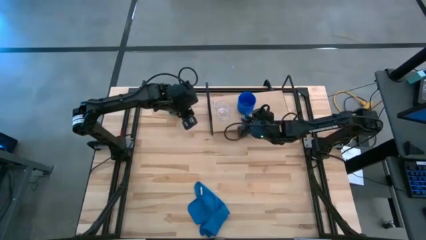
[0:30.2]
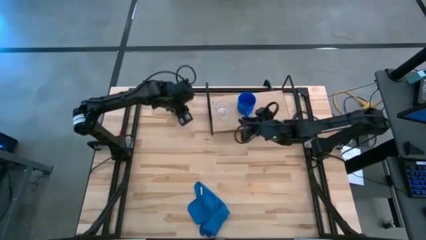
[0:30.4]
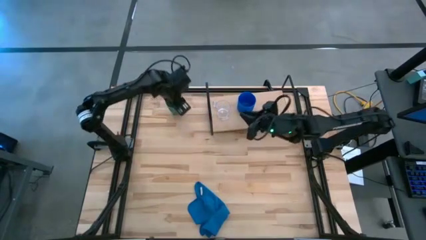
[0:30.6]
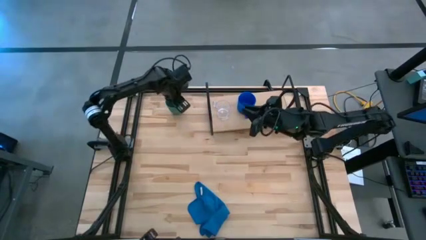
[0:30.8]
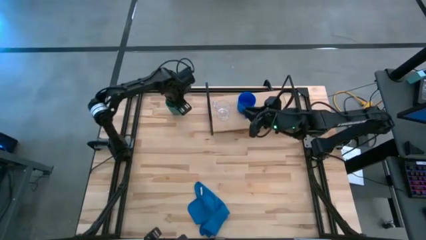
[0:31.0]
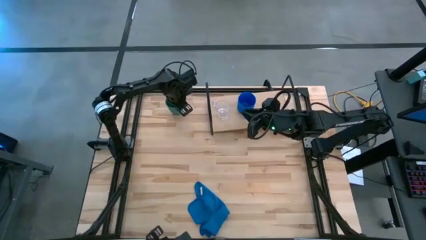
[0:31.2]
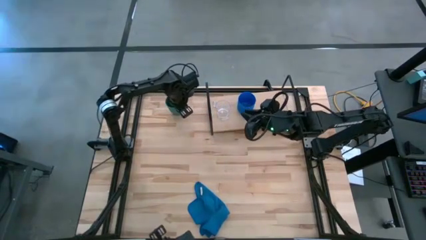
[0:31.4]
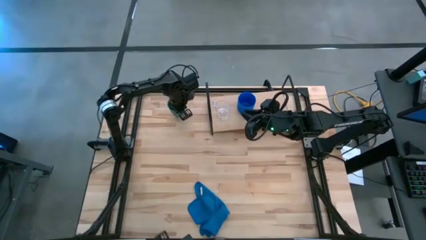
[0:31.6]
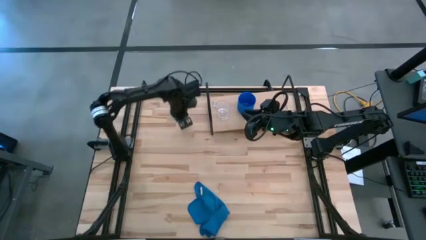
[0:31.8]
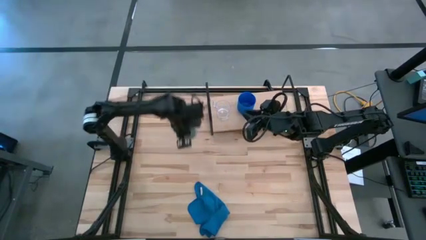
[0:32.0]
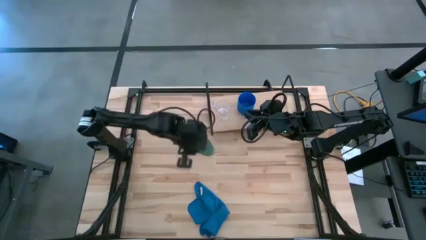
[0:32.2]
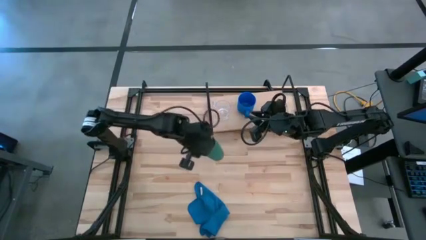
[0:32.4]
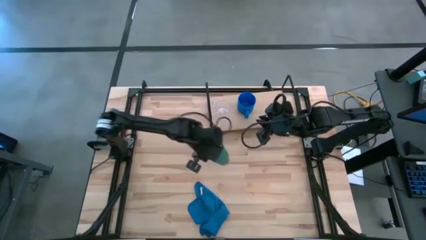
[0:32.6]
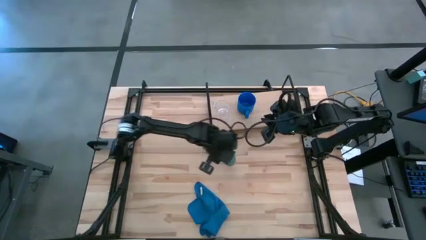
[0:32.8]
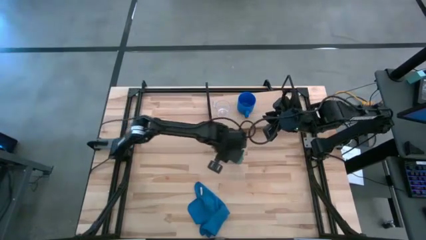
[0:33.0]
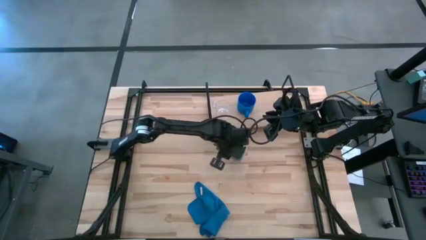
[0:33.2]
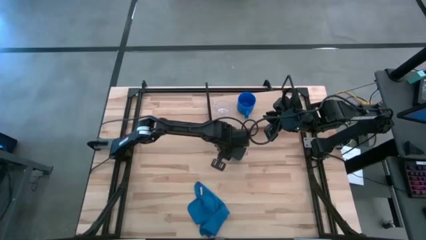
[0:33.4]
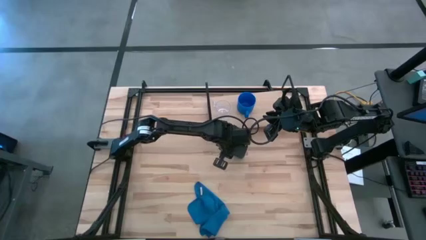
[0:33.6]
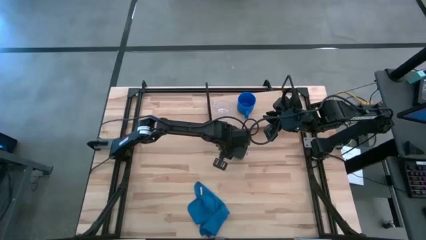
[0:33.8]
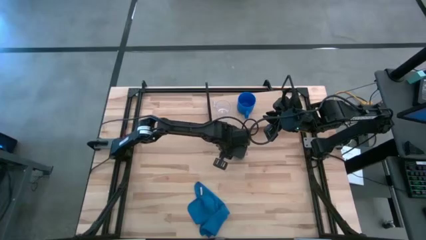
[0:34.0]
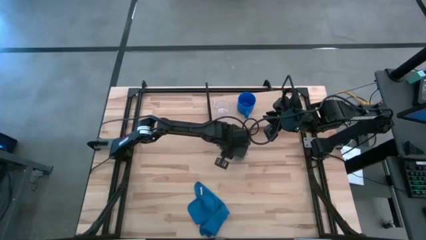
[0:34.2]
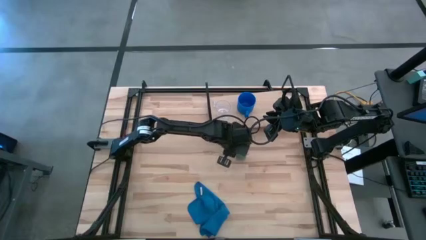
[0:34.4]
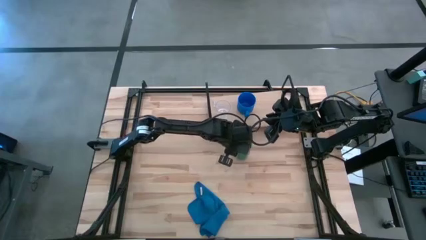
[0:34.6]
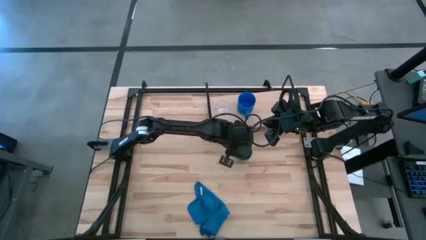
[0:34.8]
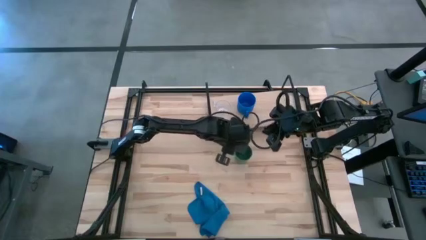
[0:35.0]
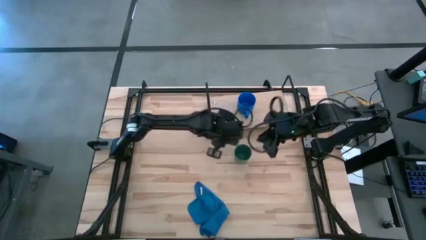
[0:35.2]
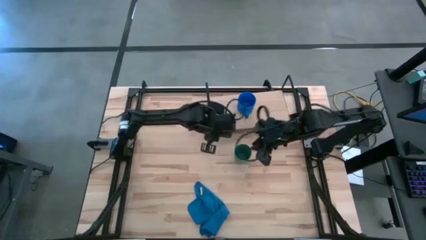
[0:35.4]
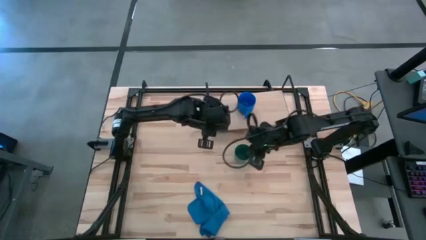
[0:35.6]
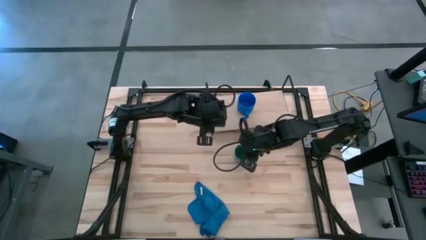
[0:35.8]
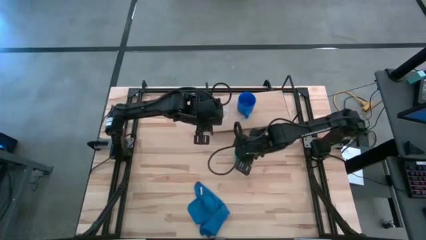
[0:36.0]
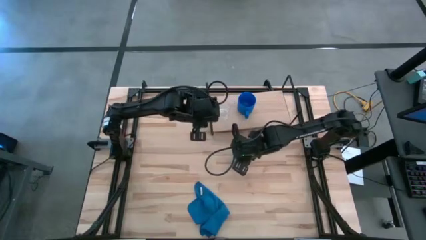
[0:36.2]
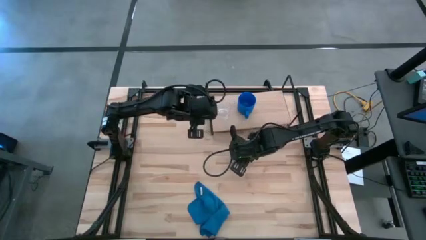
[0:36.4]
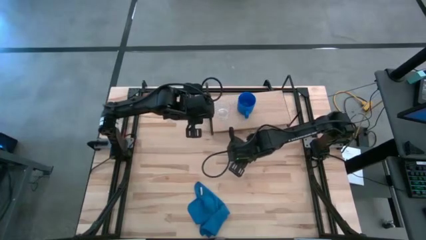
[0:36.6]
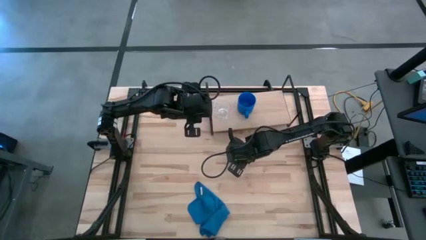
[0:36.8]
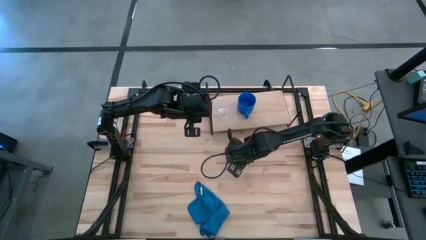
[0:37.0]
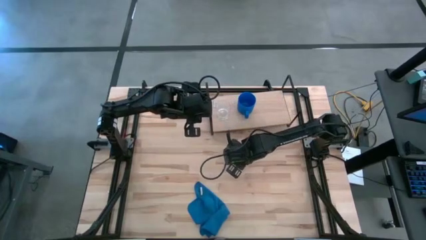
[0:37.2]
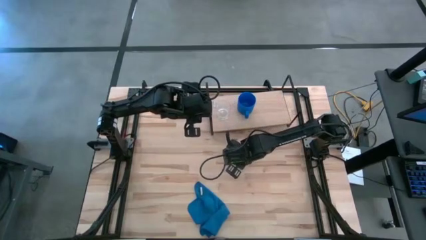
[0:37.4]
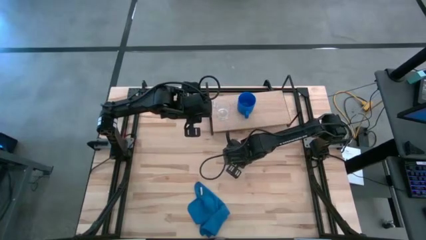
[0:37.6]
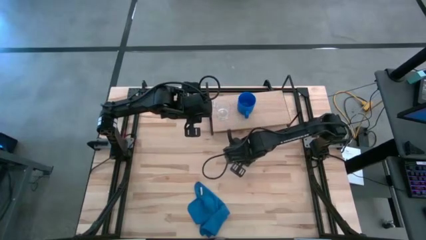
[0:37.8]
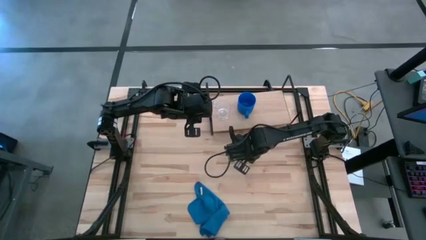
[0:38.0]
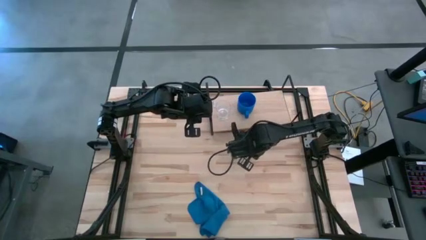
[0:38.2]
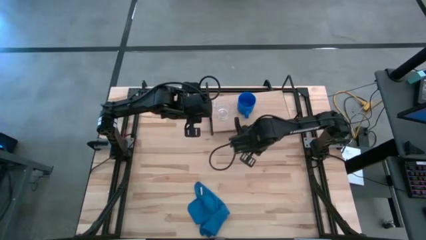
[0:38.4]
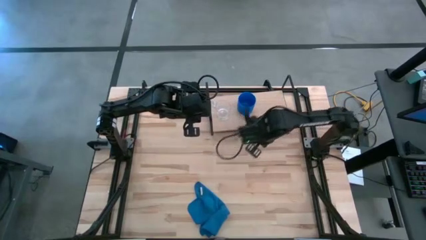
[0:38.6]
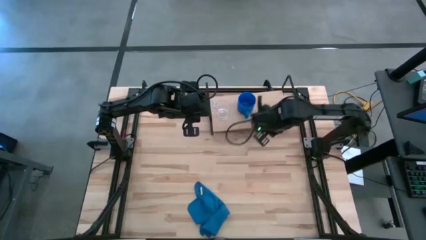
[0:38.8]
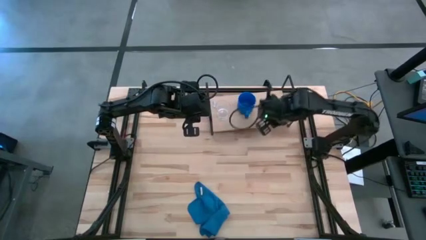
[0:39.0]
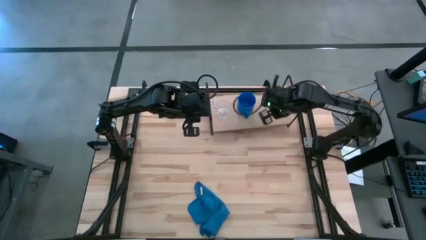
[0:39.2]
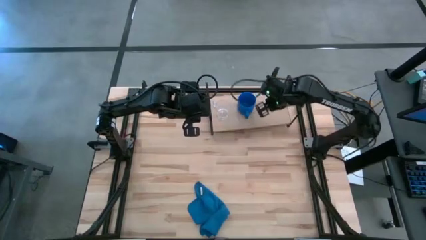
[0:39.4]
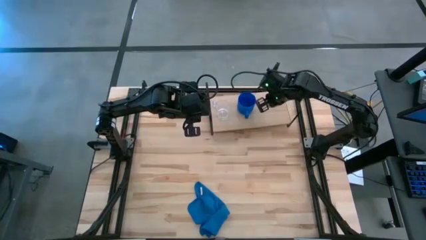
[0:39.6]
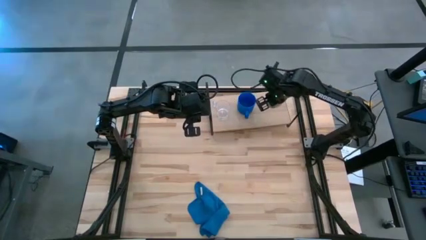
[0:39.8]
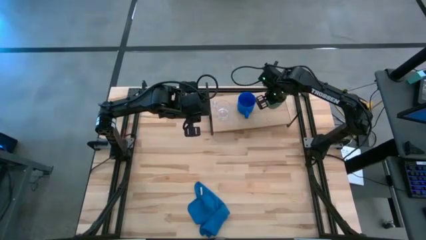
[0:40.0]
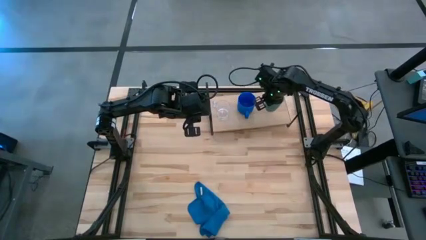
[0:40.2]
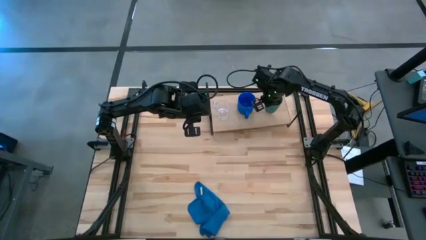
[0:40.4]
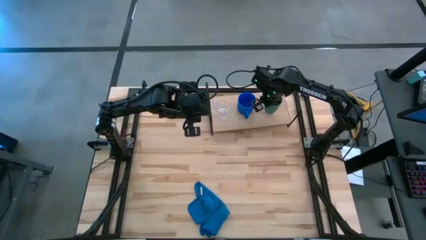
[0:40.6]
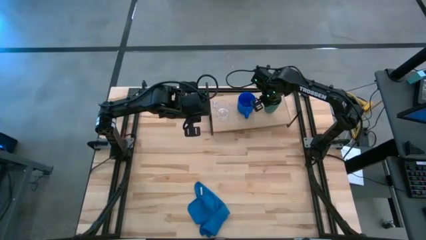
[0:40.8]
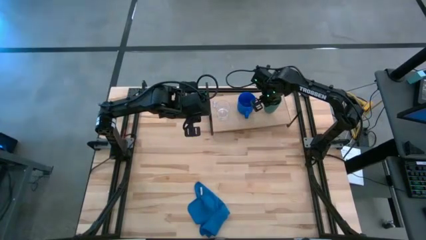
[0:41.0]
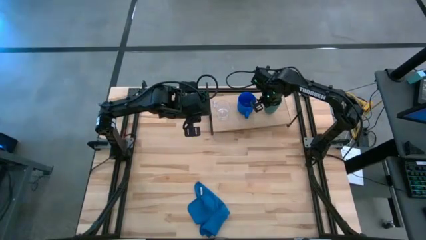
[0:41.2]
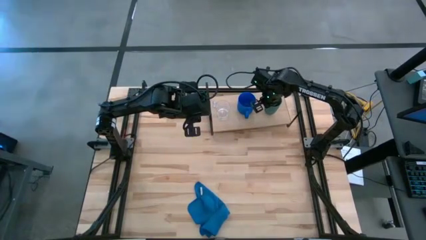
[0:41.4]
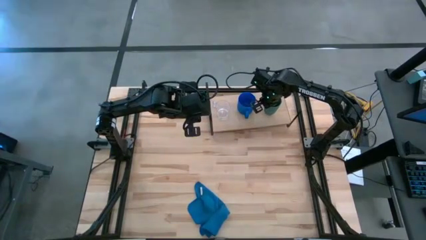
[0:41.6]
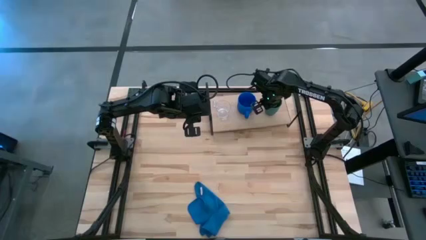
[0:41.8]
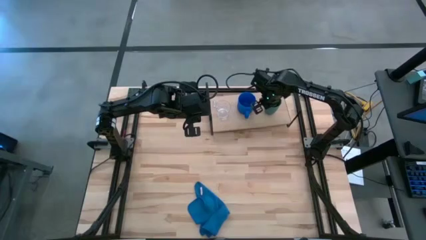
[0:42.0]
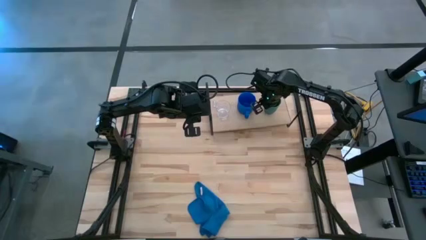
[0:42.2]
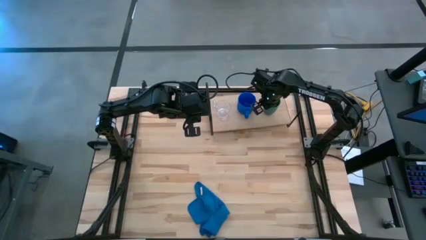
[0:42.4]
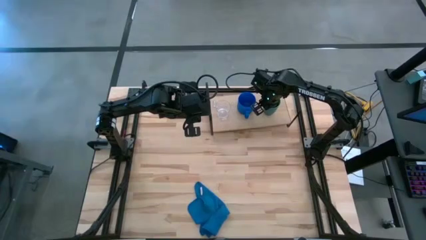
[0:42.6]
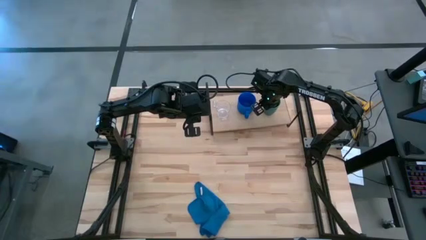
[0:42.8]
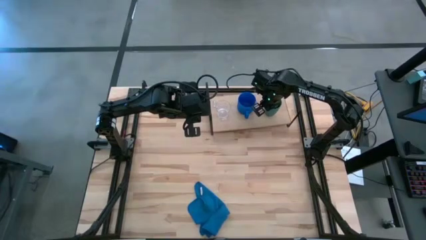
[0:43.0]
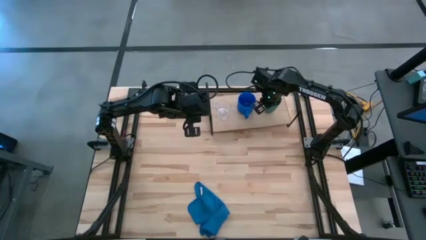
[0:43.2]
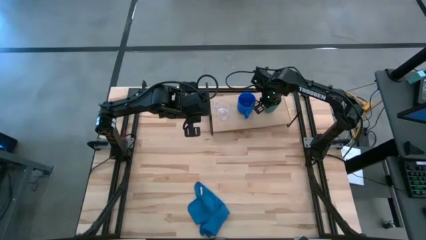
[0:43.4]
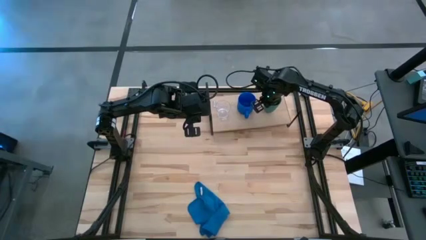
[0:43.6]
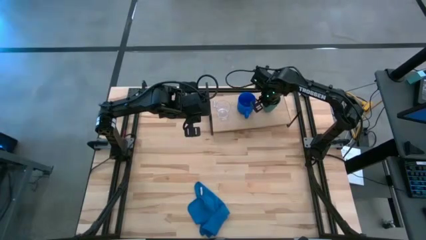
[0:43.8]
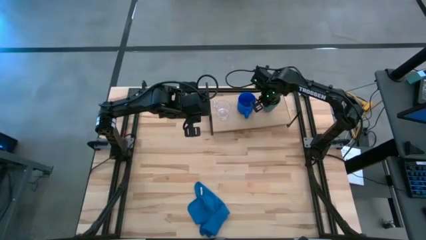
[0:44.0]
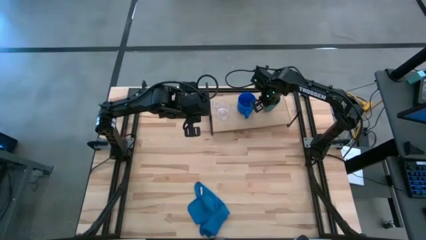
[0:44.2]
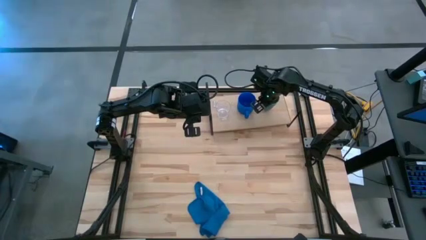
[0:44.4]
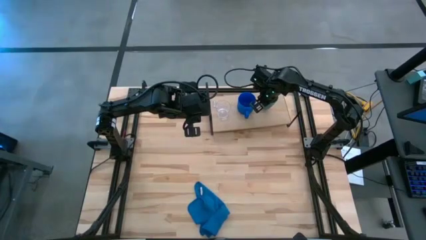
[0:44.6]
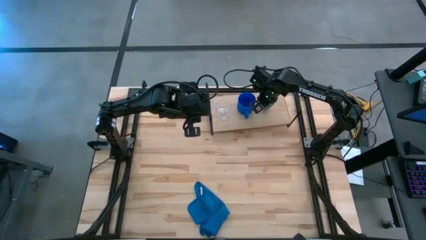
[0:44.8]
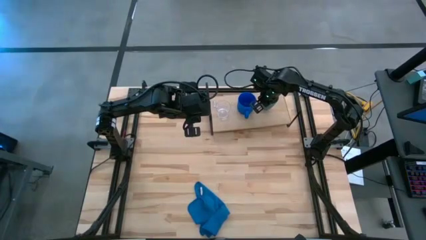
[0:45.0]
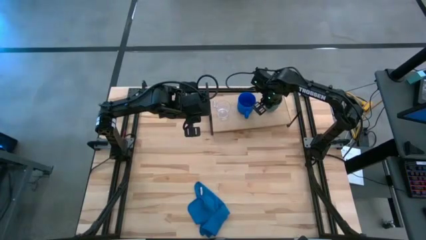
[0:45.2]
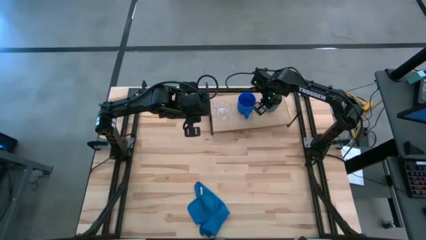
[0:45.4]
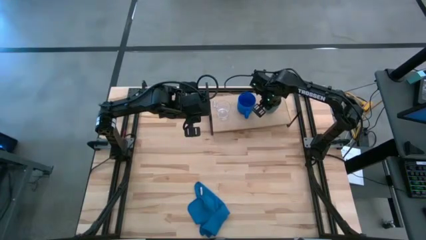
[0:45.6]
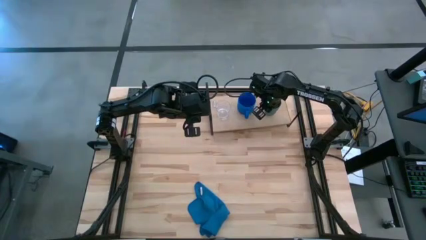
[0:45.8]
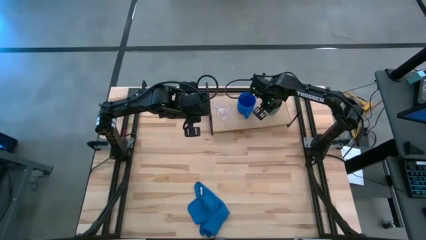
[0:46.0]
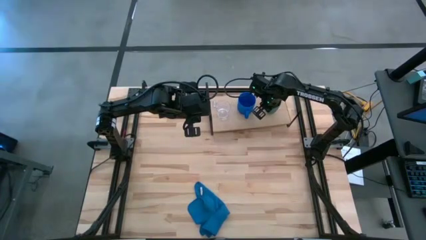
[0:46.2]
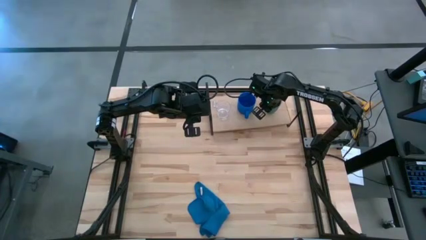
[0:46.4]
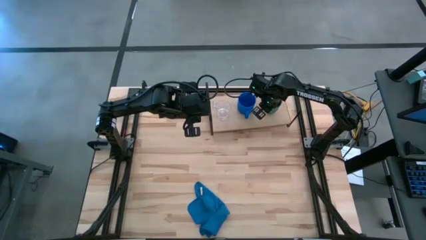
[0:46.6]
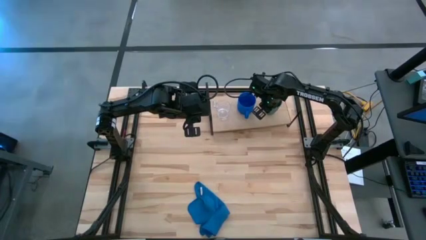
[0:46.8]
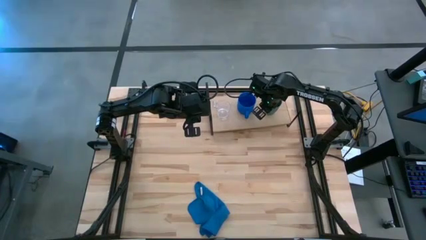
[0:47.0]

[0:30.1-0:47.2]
Task: Stack small to large cups/mugs on shelf
Put the green cup on the shelf
